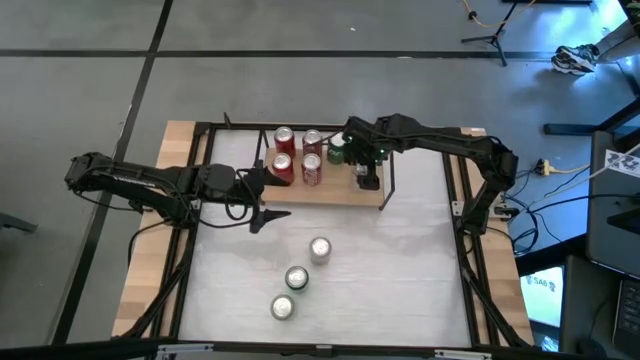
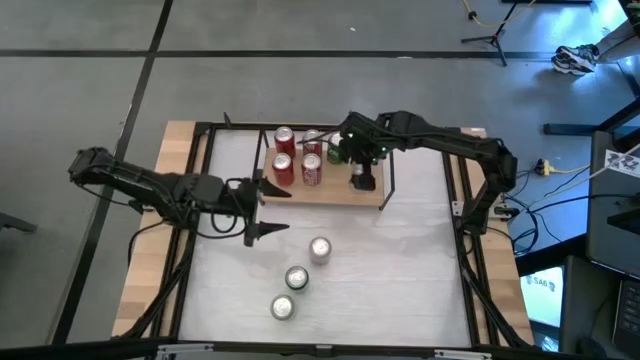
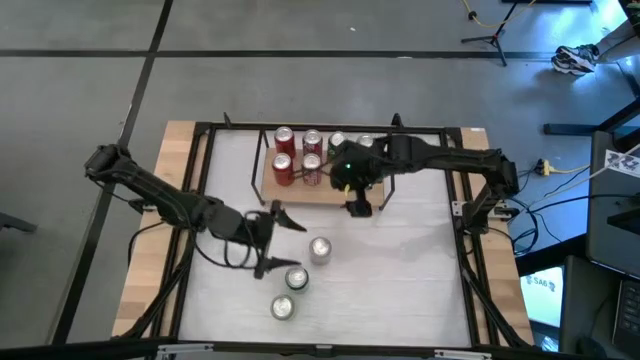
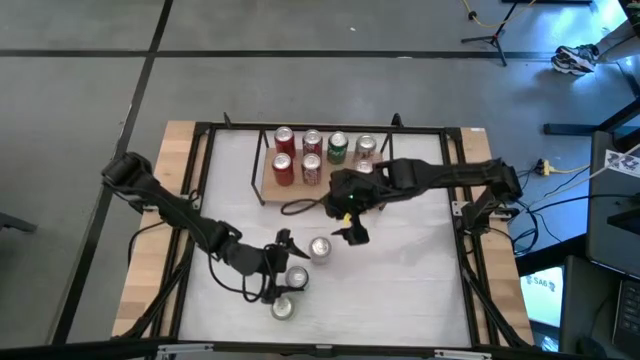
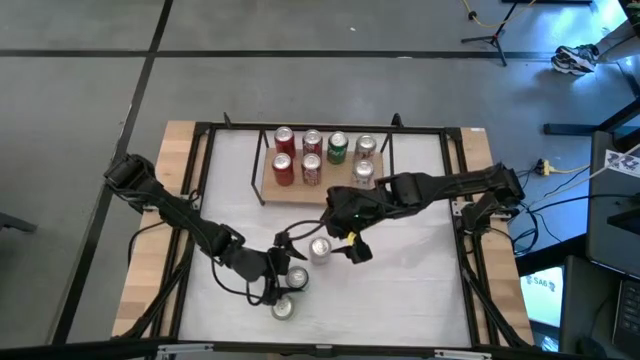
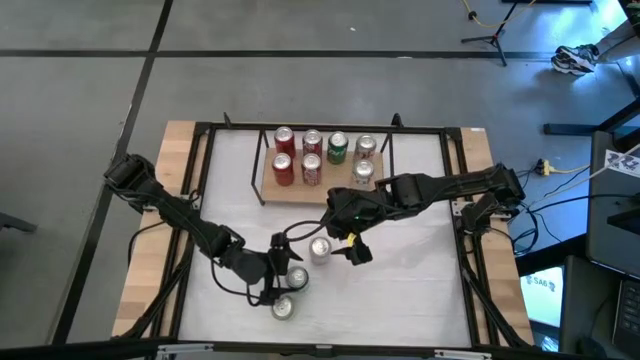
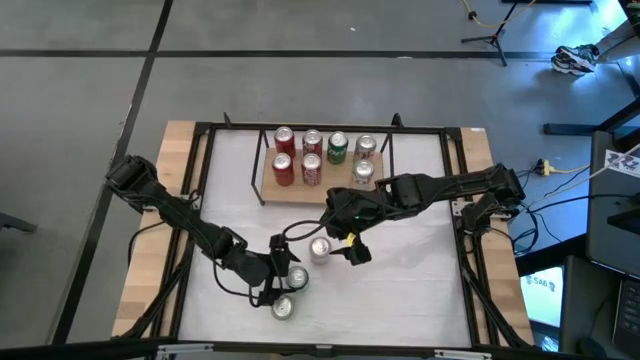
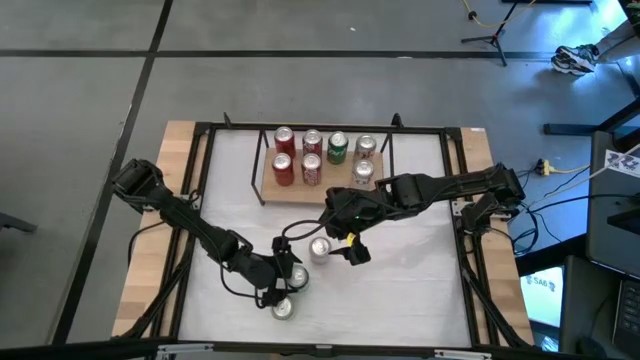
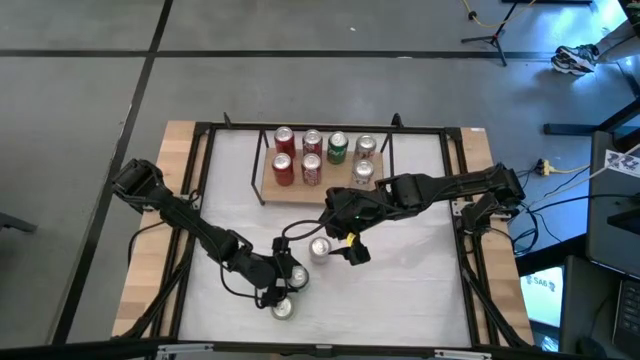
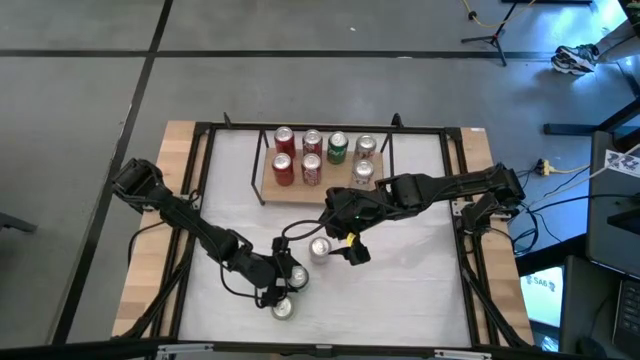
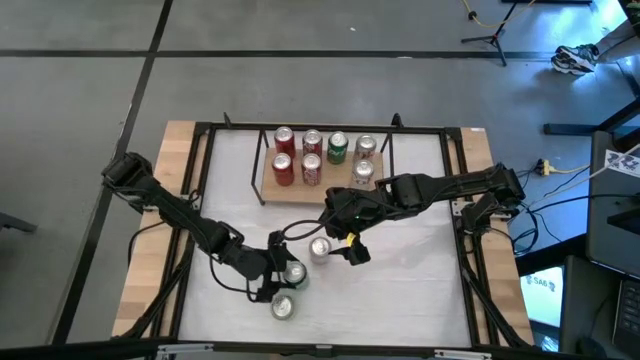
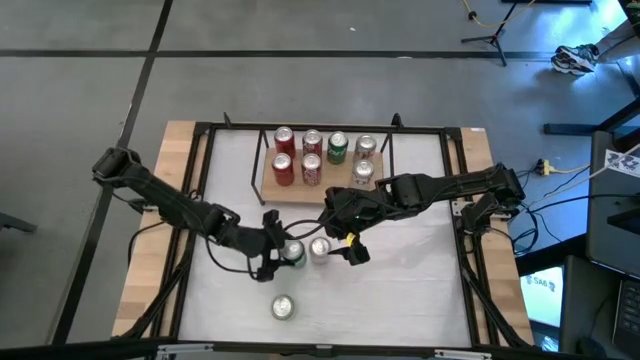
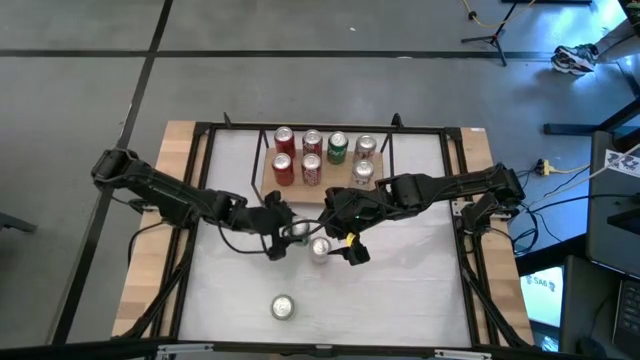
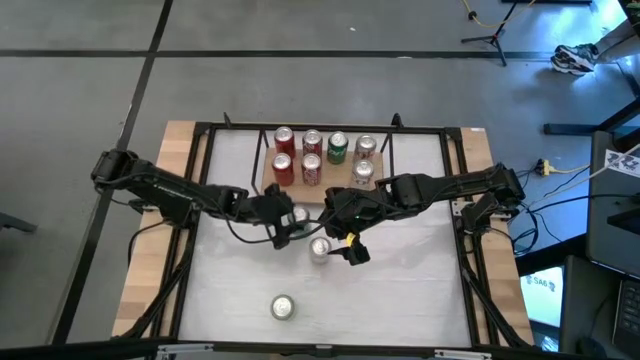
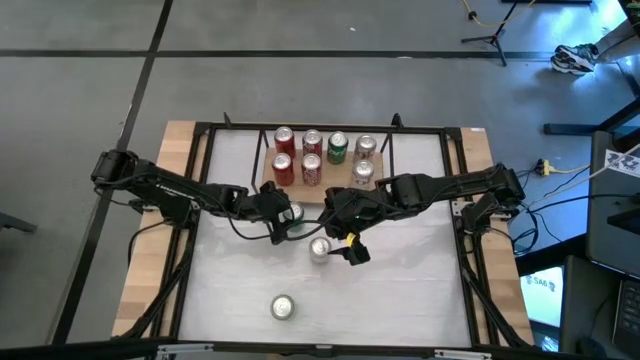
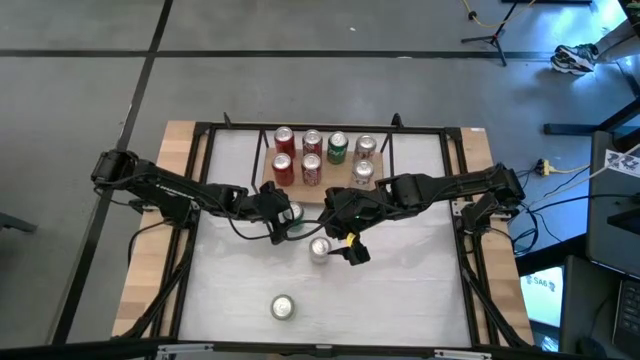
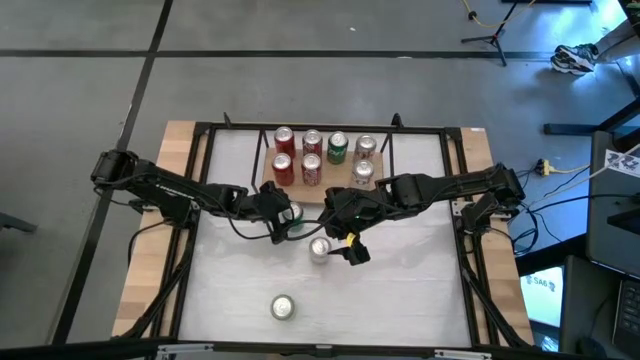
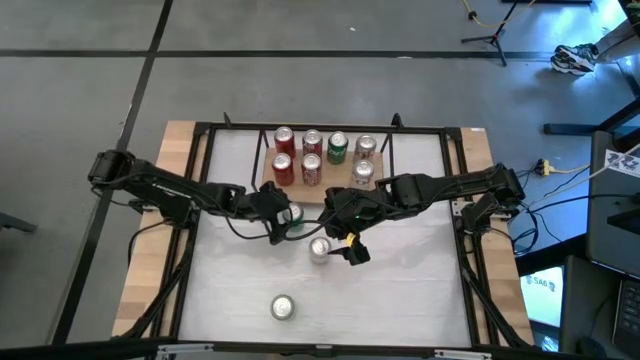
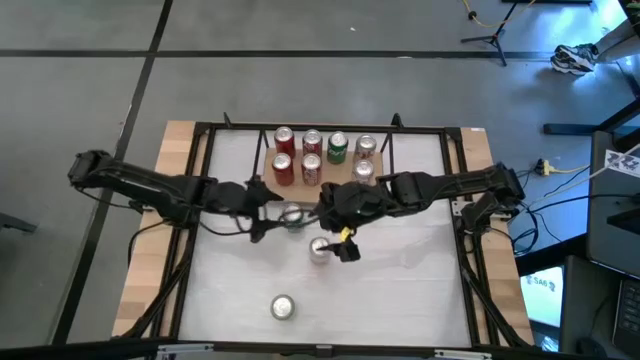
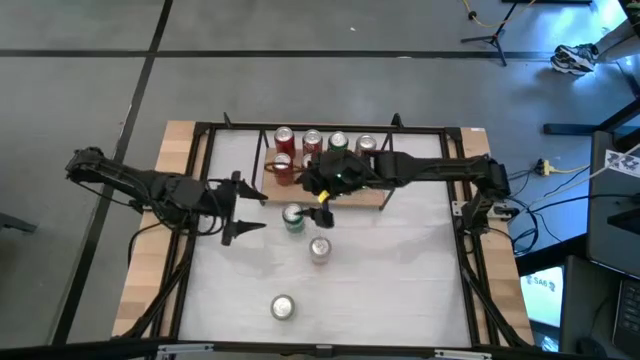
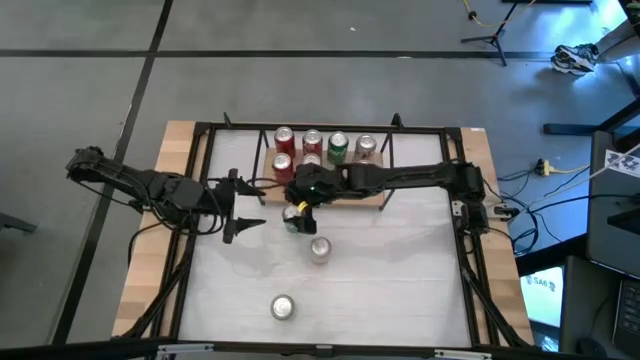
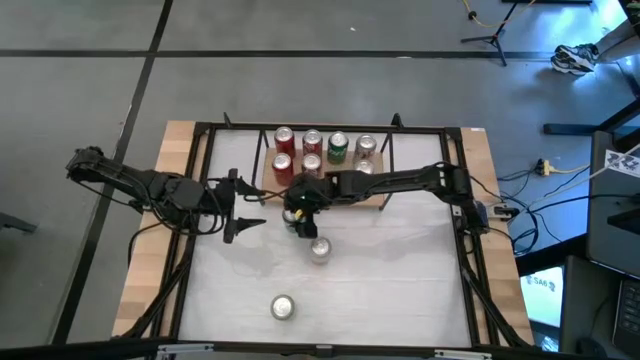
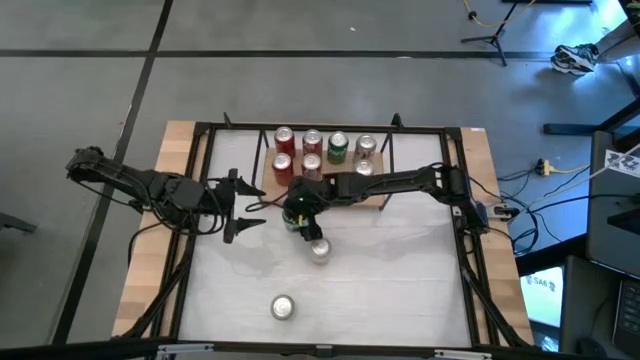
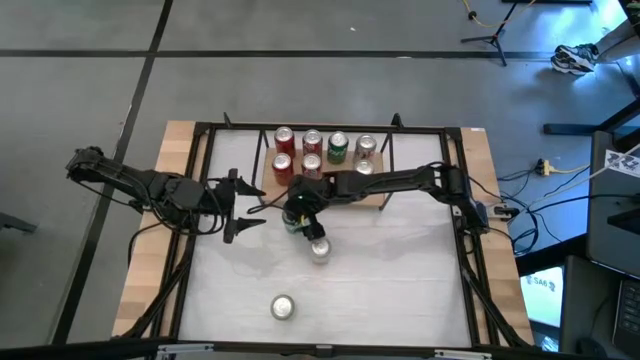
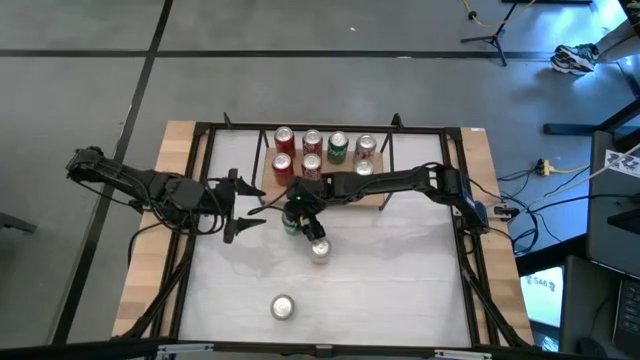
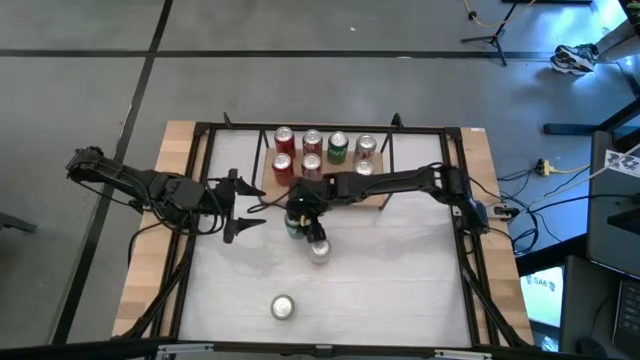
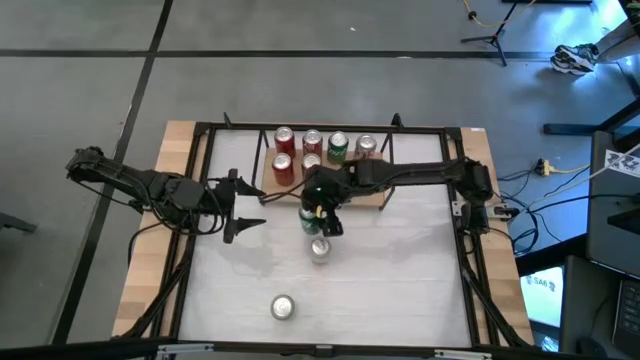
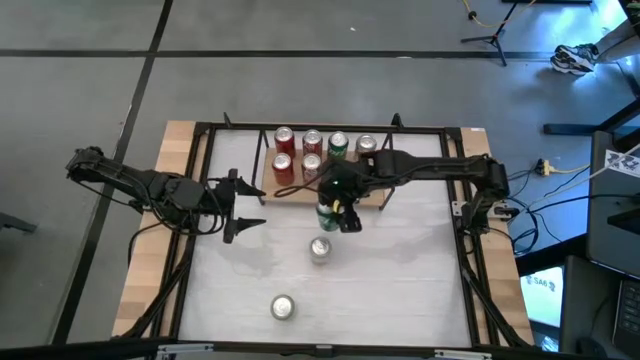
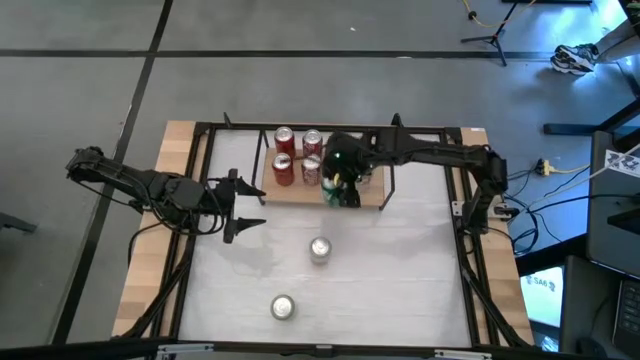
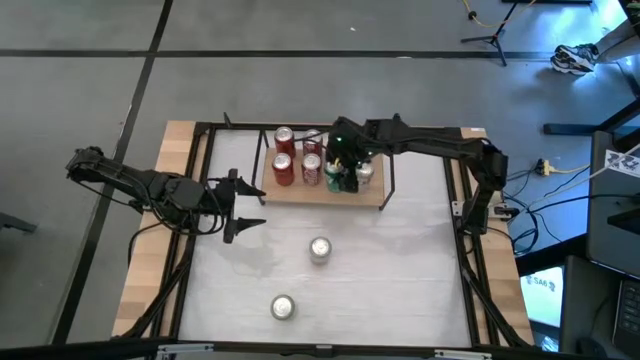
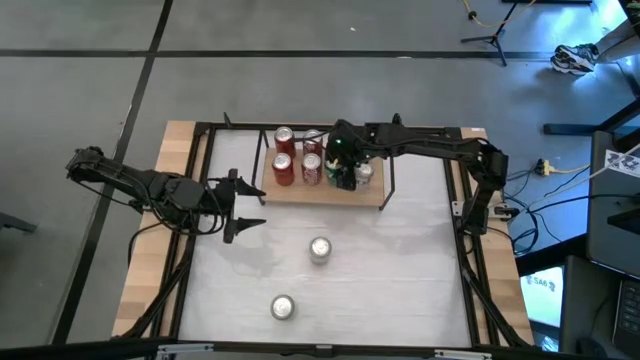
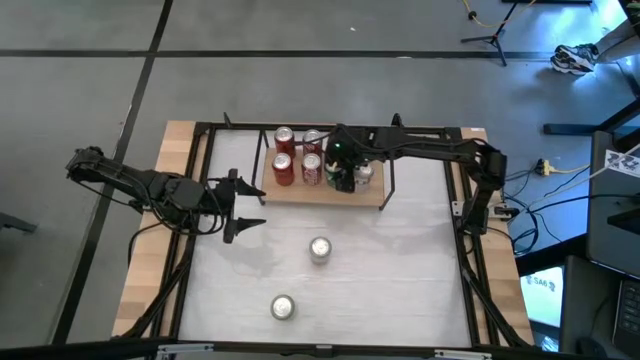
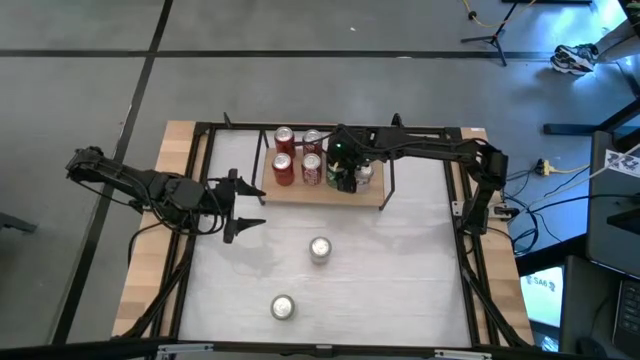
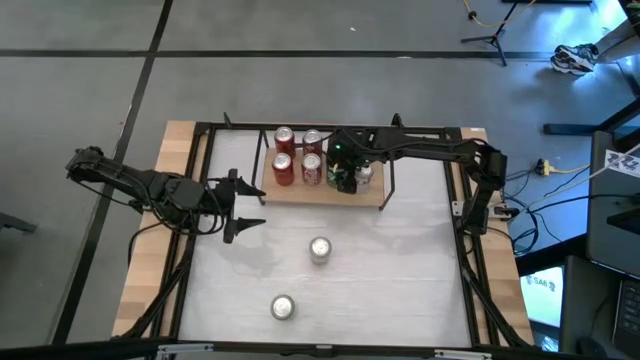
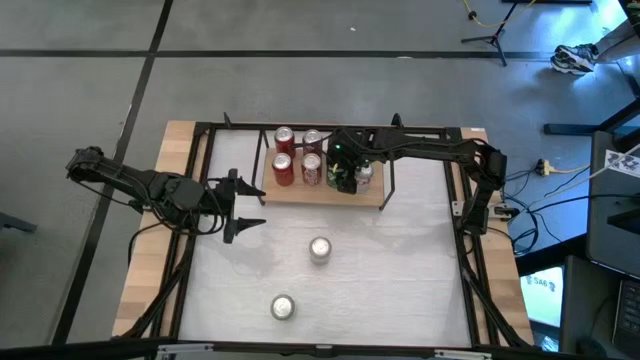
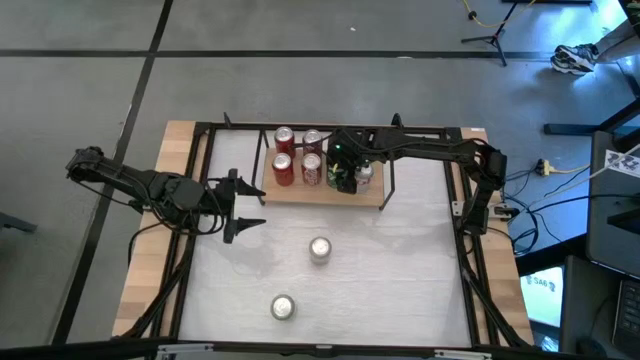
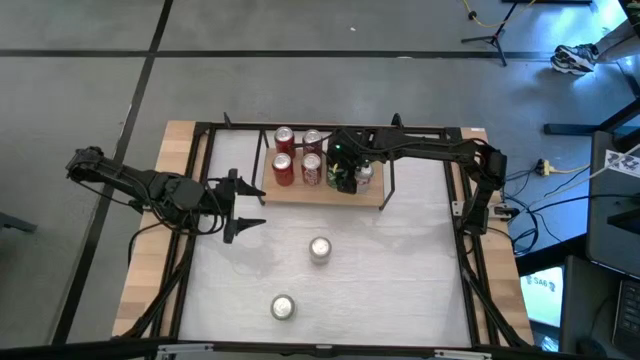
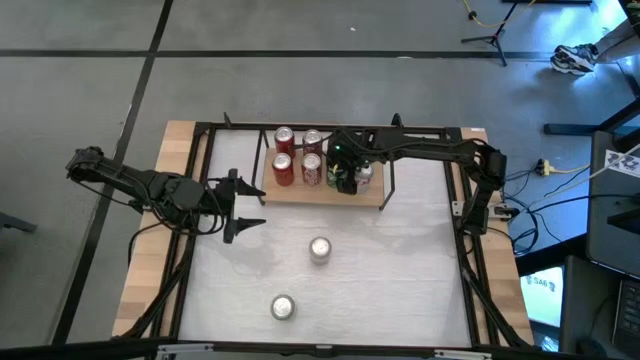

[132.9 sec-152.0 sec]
Task: Place canned beverage on shelf
Put the green soda can on the shelf aligned with the other green soda can
